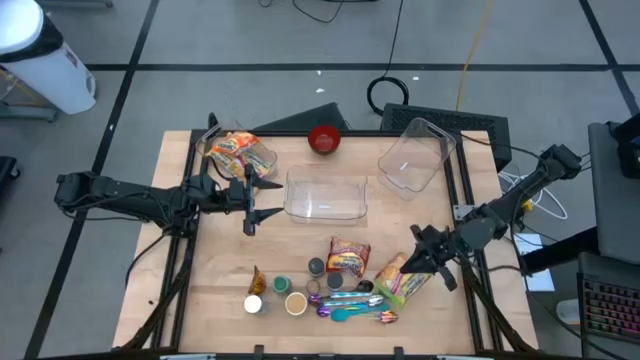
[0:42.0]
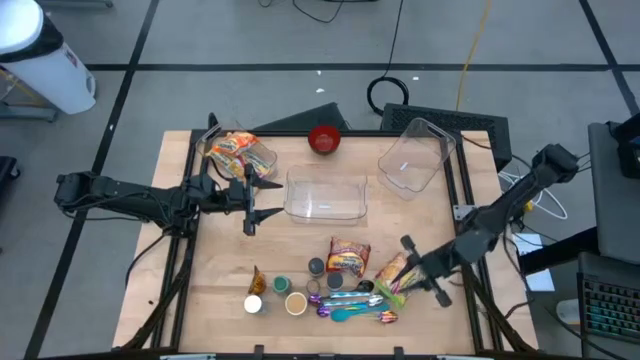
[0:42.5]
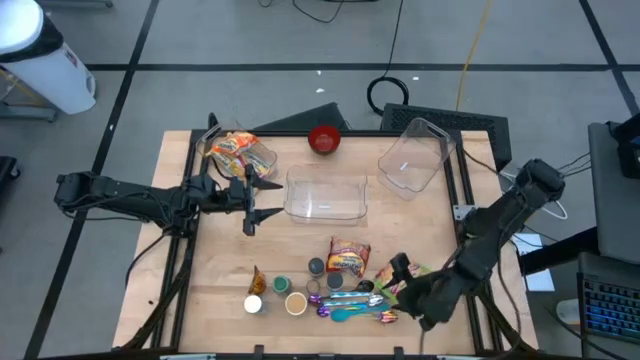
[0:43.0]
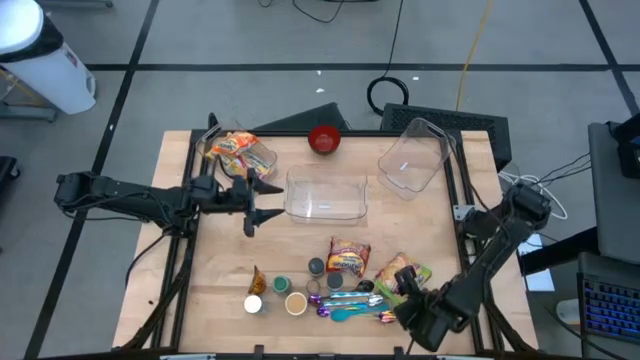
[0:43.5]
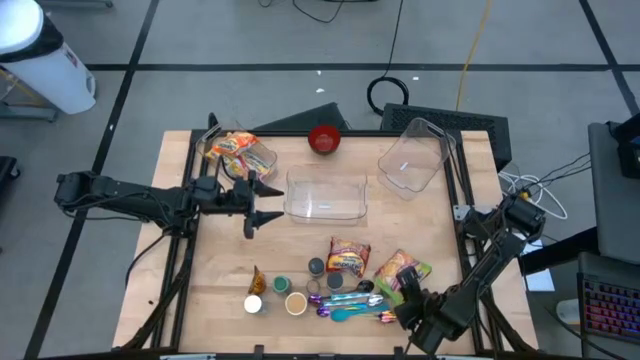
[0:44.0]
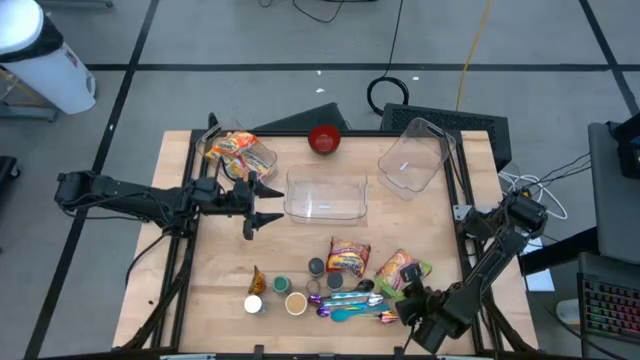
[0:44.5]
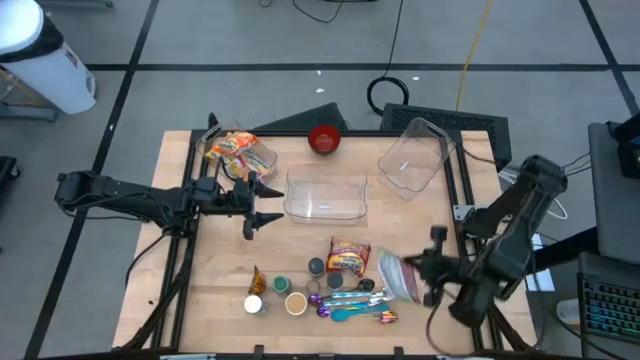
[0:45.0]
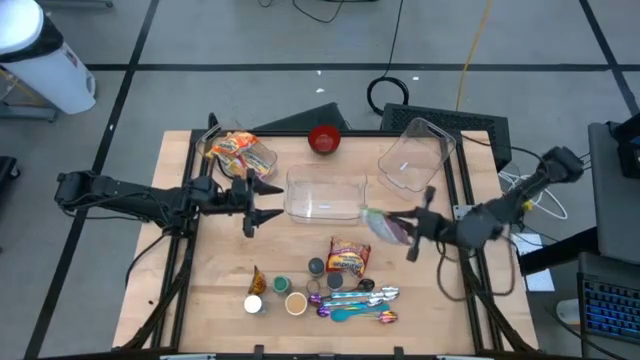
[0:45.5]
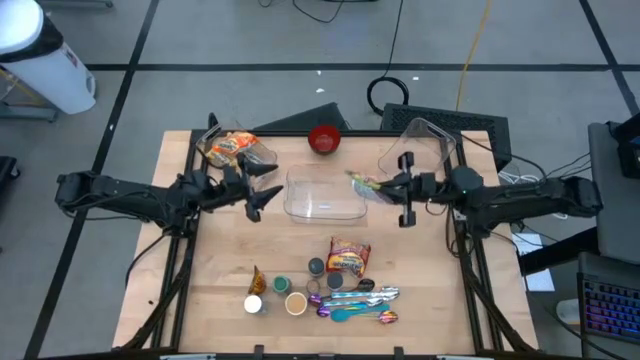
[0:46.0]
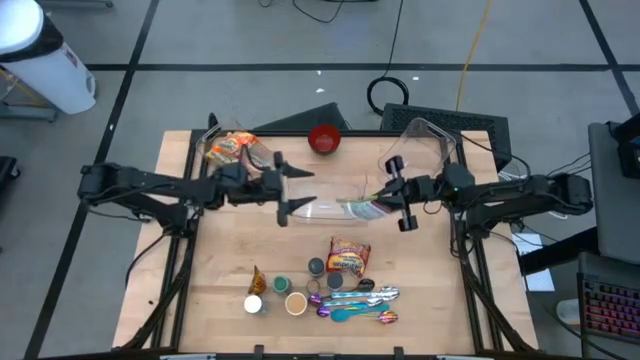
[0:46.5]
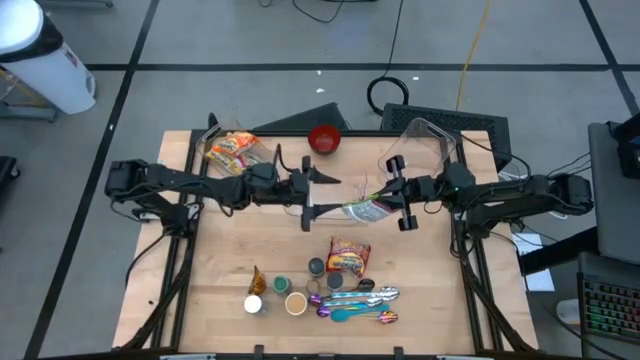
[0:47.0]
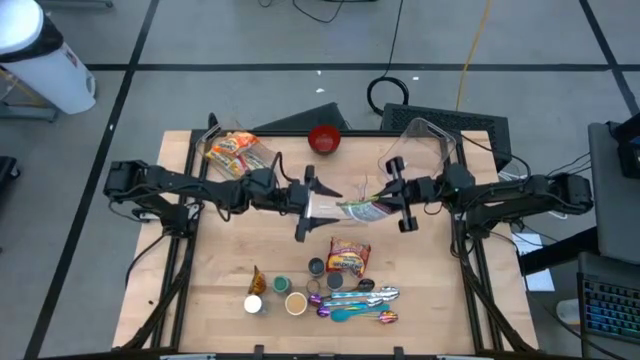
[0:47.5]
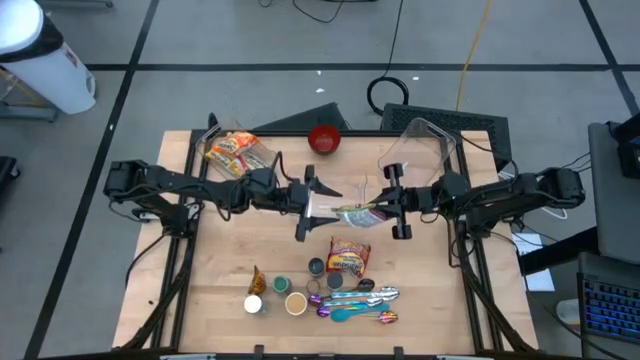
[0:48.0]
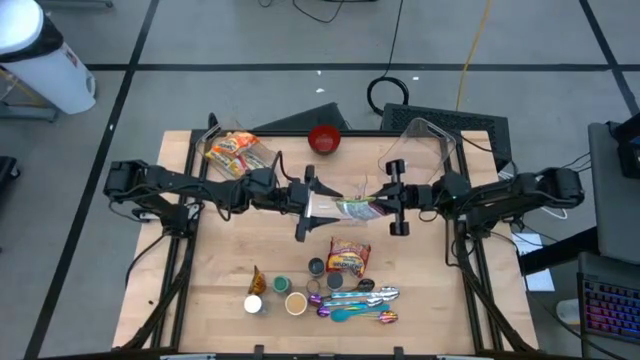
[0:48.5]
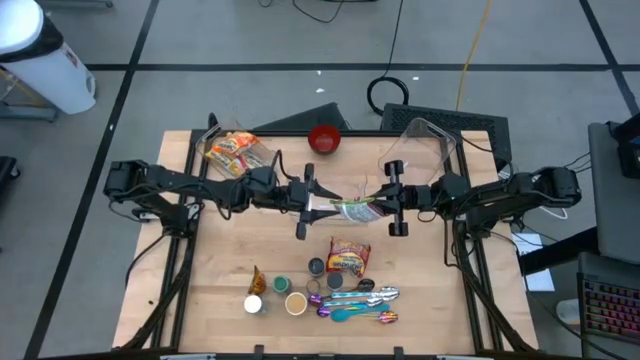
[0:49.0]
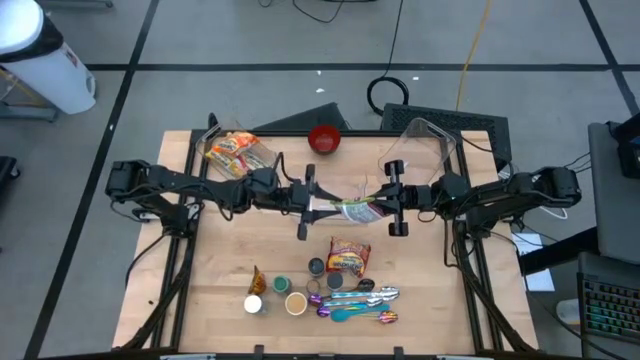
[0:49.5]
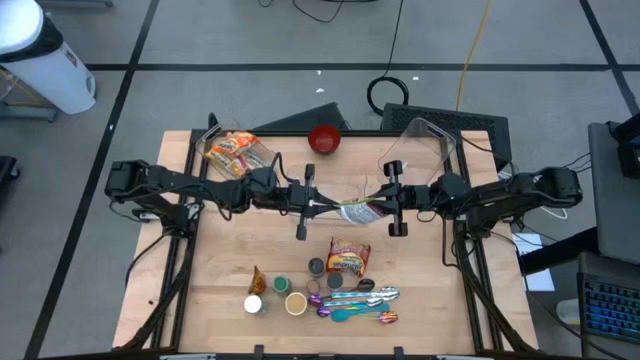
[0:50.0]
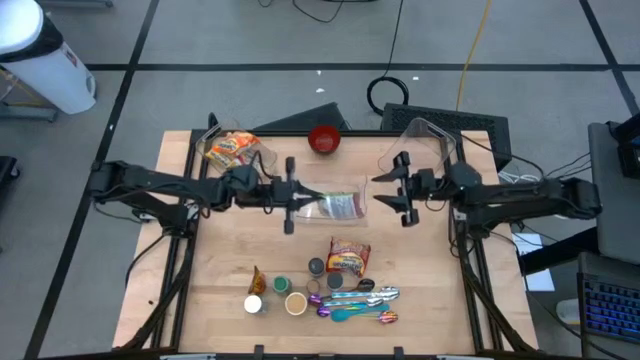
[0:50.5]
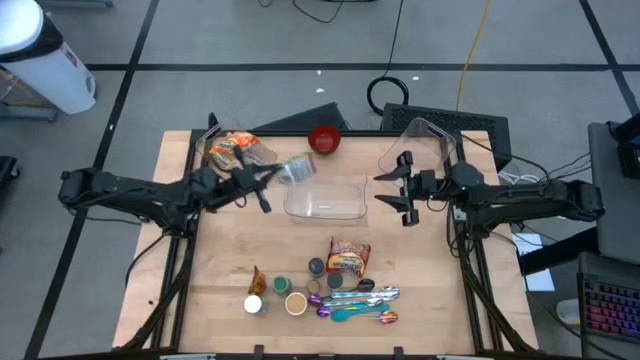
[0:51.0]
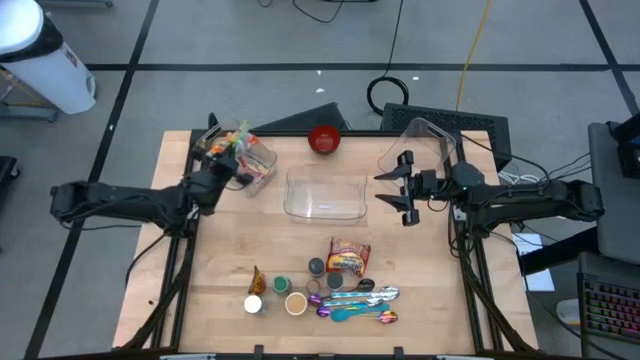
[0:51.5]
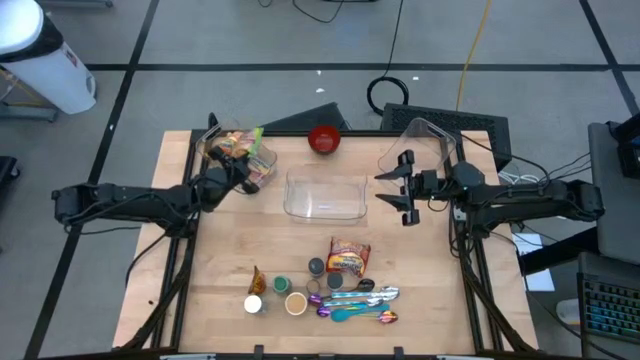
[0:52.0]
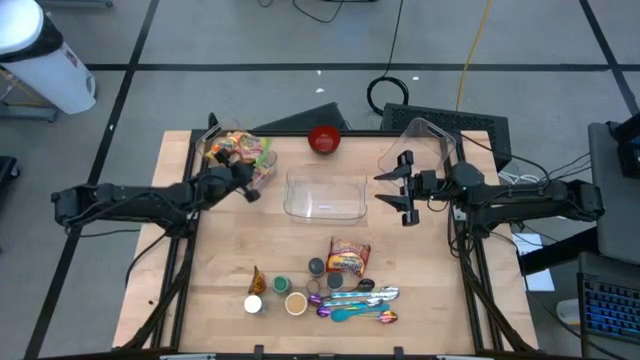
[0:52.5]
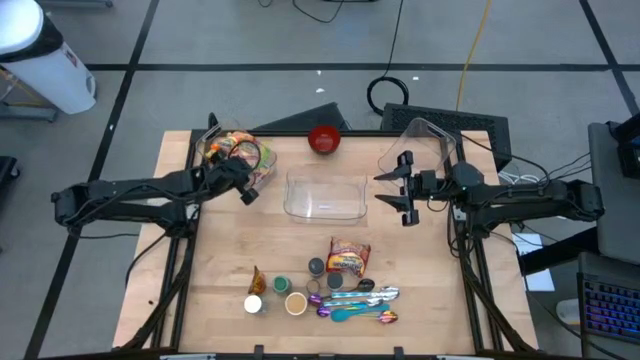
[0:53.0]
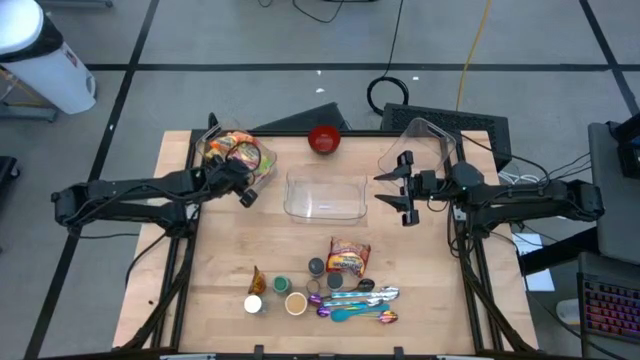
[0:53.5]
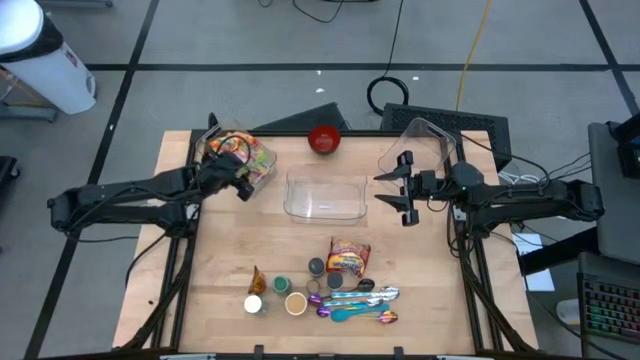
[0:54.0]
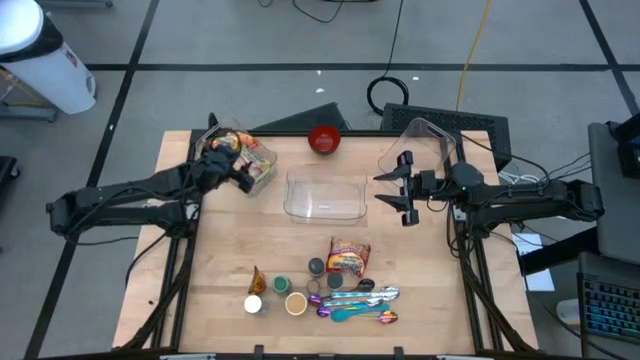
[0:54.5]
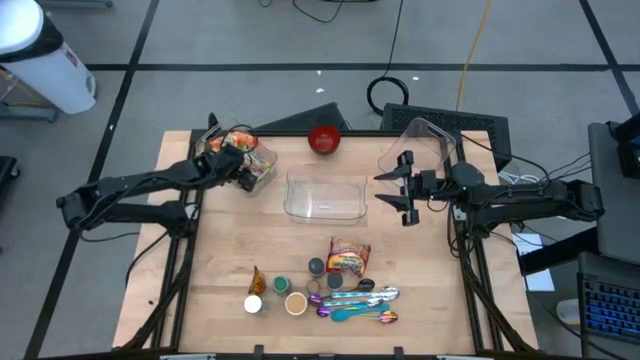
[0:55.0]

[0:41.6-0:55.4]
Task: Pick & Place Food Item
Put the green noodle pack into the left transparent bin

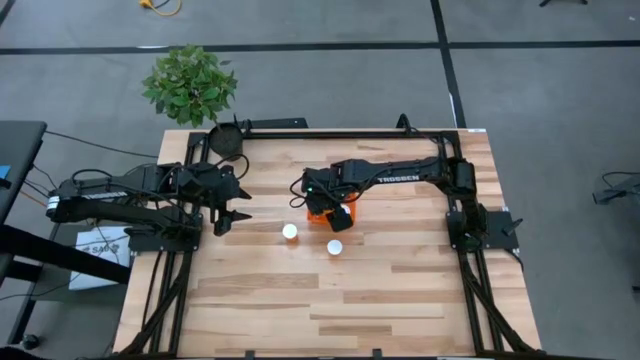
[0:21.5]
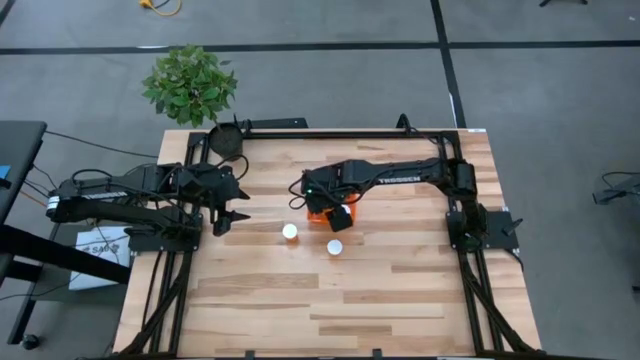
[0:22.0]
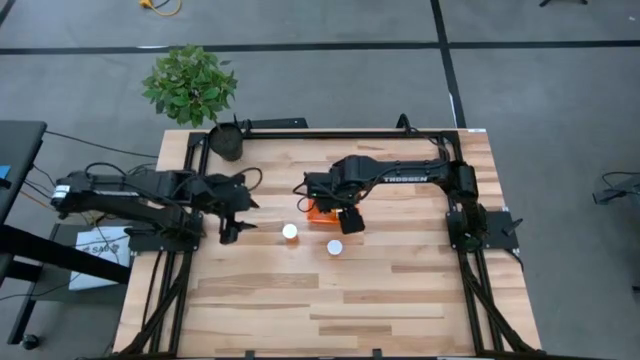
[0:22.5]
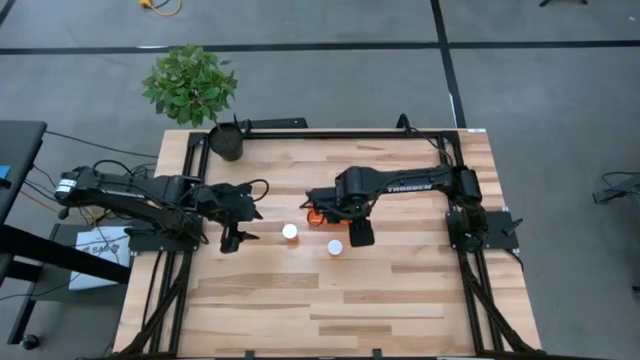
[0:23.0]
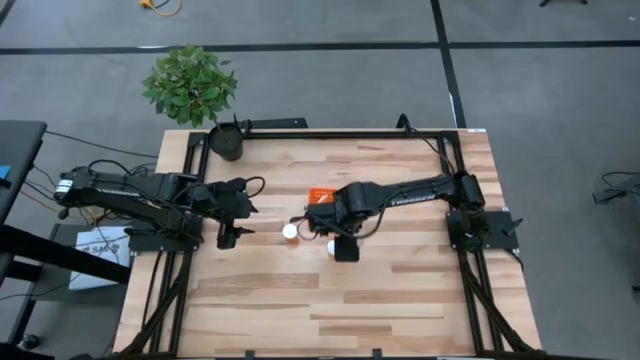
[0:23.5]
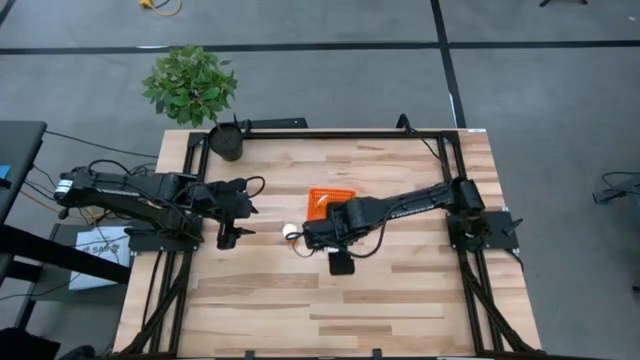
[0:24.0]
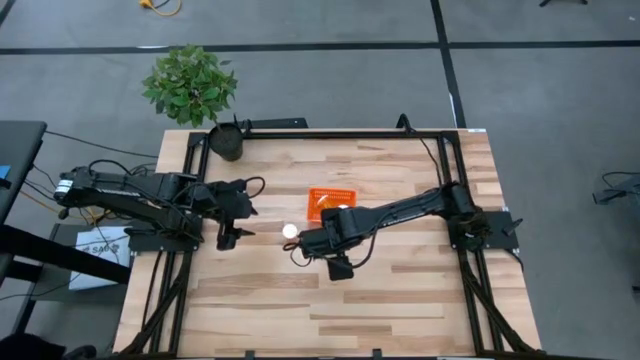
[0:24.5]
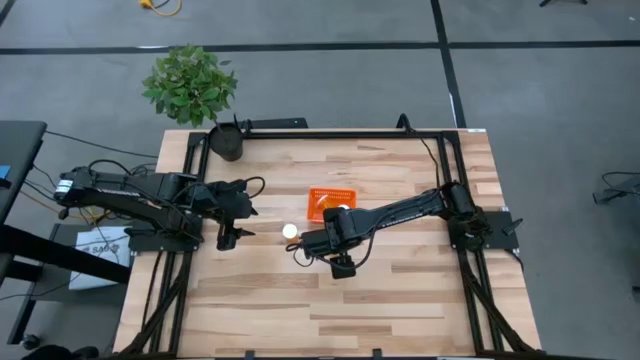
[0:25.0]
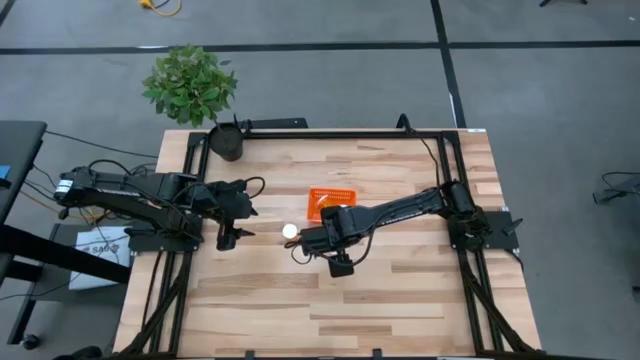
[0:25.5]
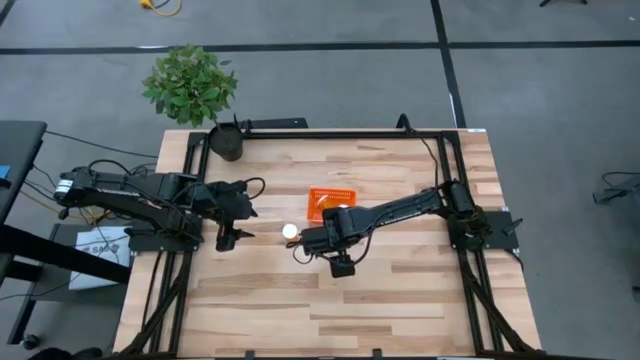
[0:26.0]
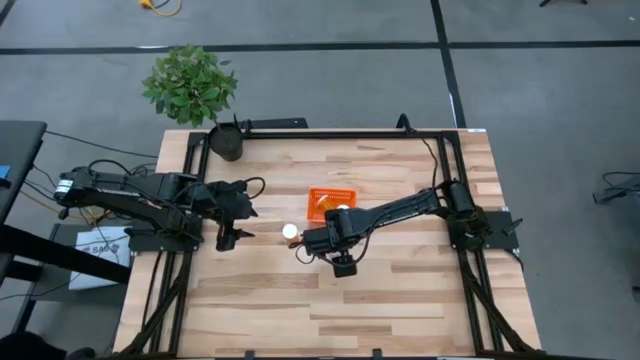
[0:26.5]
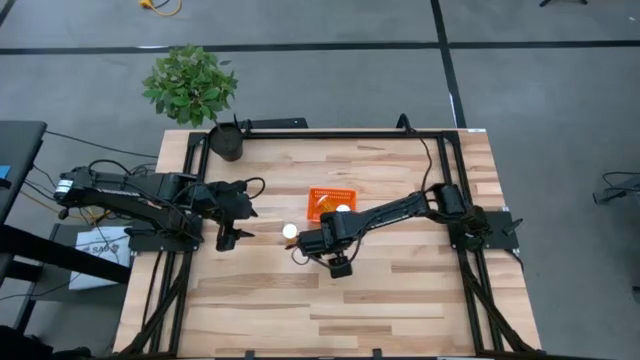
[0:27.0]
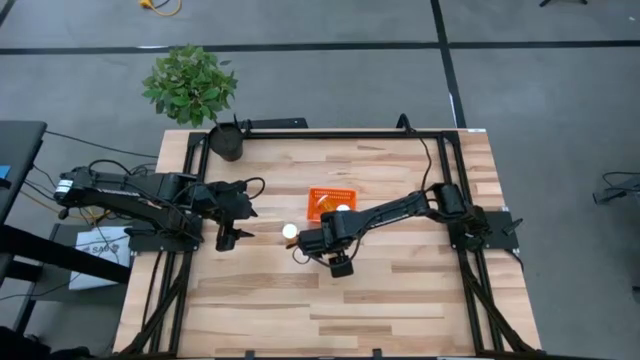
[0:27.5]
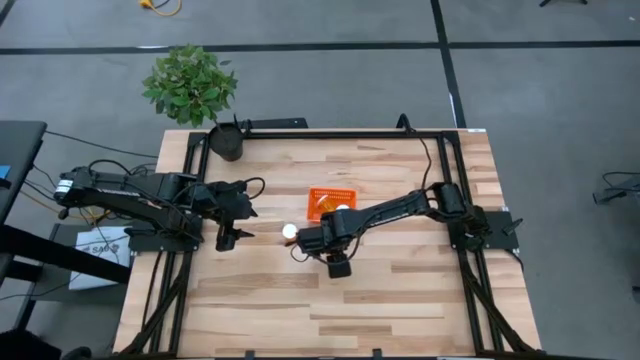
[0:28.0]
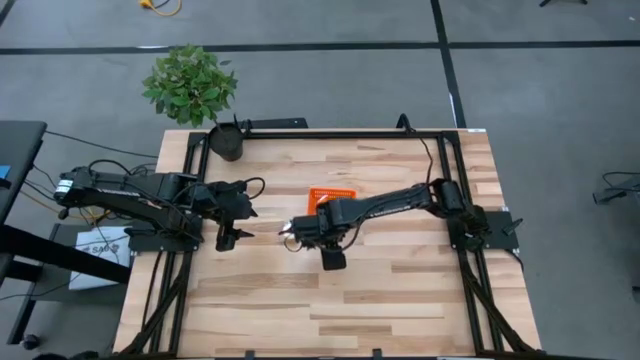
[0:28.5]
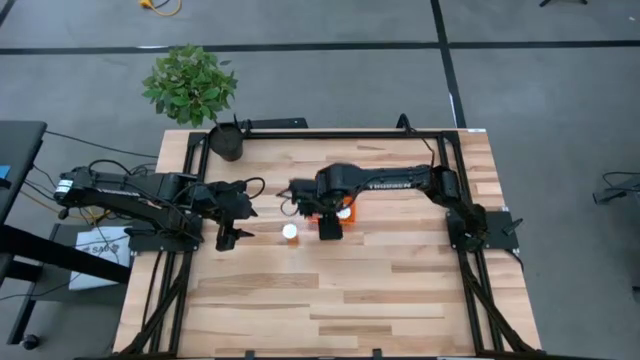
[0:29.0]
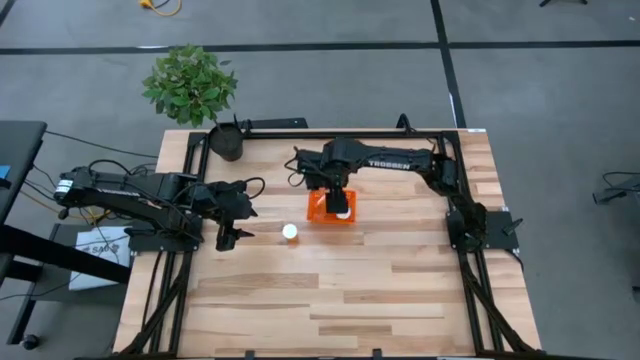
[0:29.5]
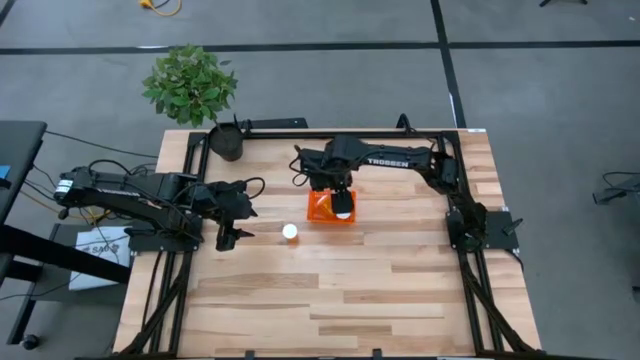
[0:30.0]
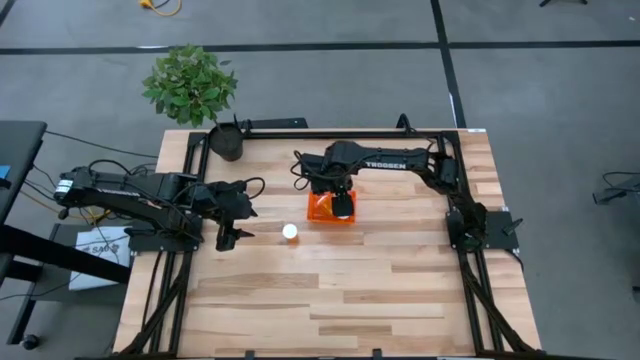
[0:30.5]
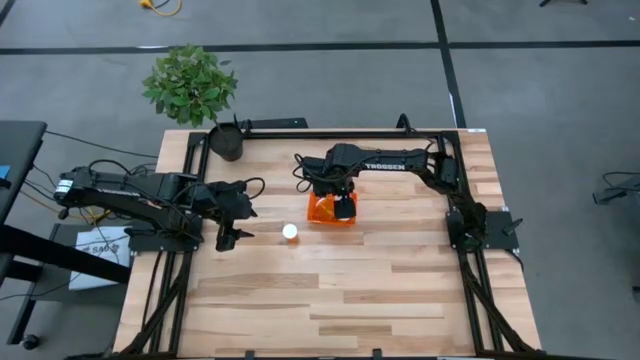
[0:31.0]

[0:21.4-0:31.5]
Task: Pick and place pill bottles into a basket
Put the orange pill bottle into the orange basket
